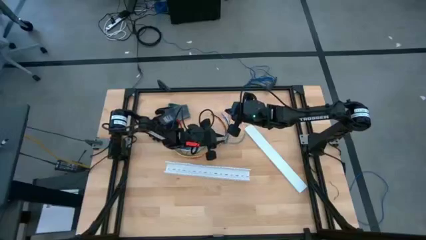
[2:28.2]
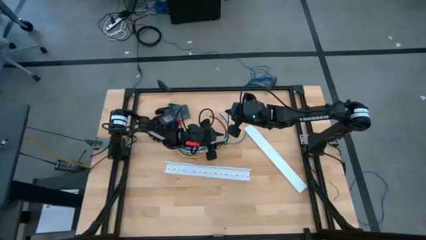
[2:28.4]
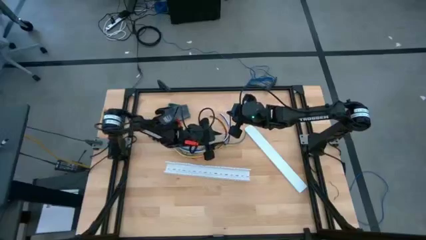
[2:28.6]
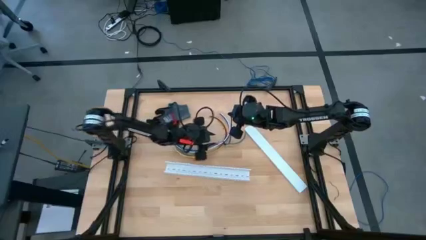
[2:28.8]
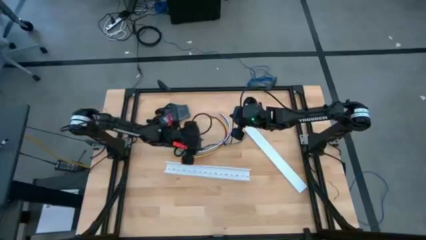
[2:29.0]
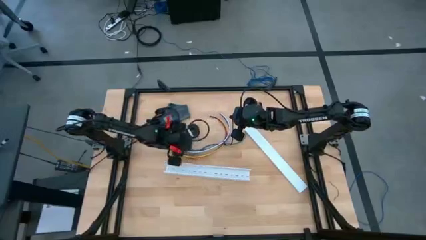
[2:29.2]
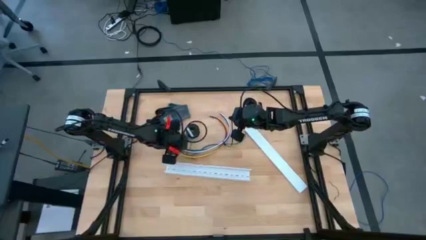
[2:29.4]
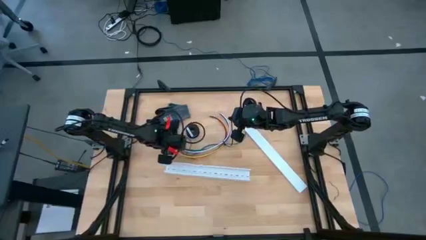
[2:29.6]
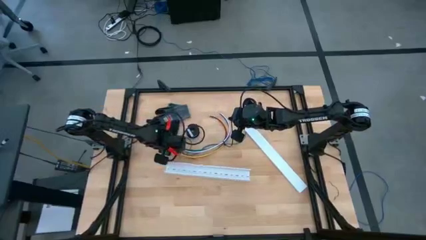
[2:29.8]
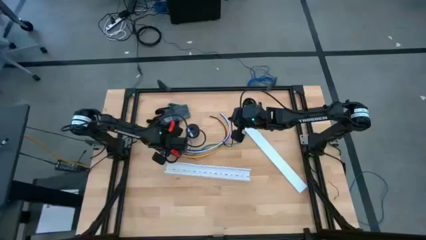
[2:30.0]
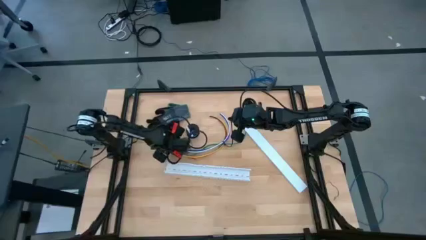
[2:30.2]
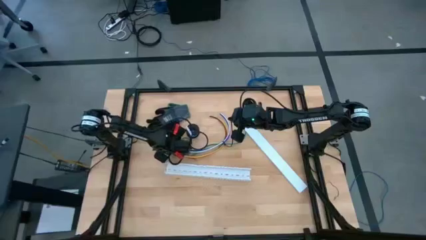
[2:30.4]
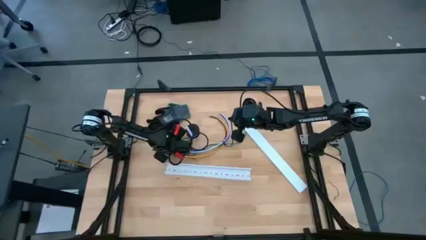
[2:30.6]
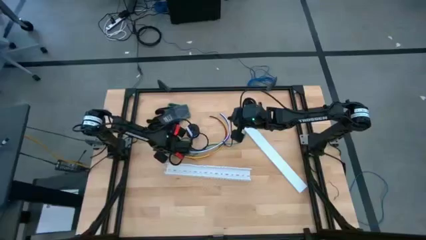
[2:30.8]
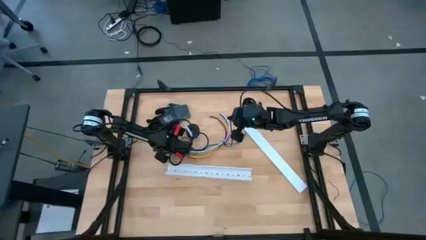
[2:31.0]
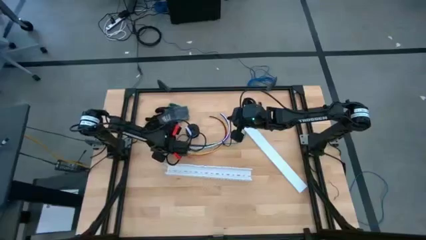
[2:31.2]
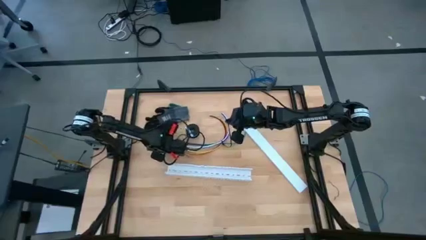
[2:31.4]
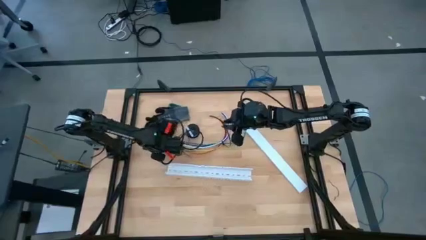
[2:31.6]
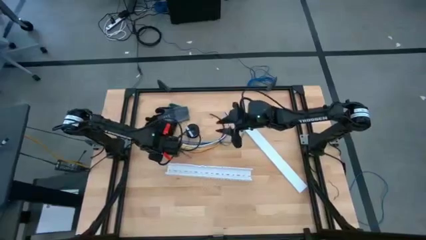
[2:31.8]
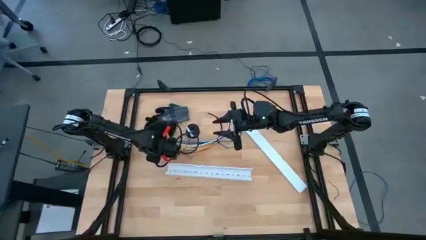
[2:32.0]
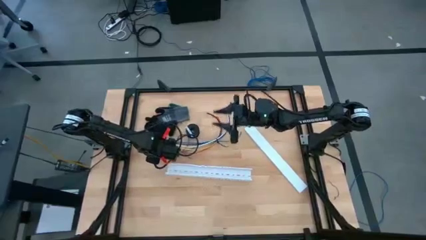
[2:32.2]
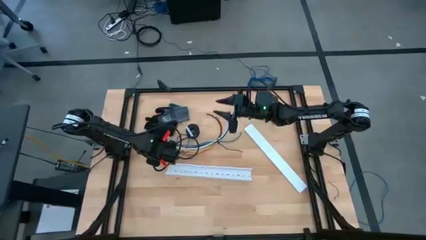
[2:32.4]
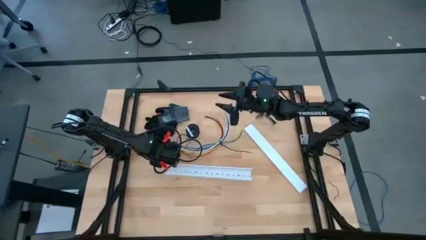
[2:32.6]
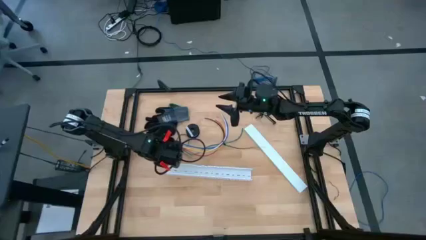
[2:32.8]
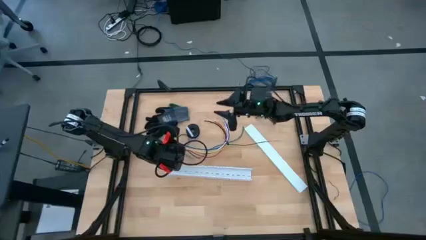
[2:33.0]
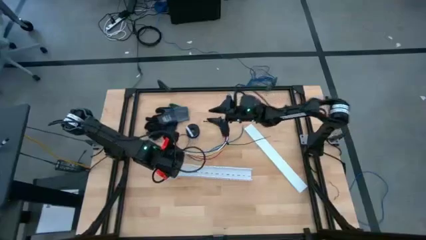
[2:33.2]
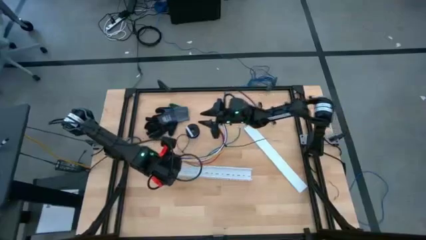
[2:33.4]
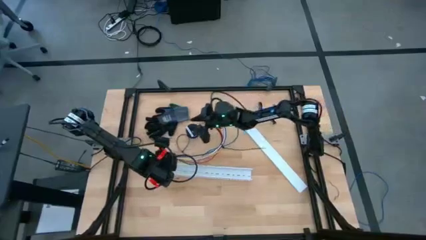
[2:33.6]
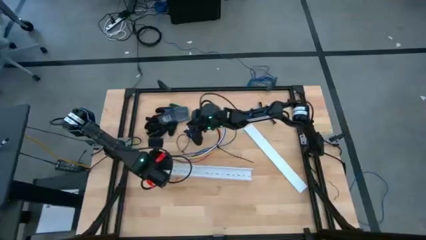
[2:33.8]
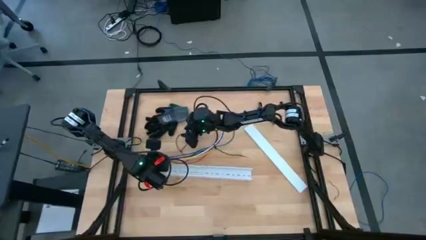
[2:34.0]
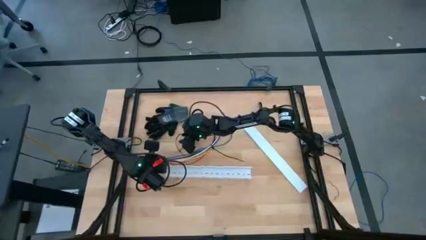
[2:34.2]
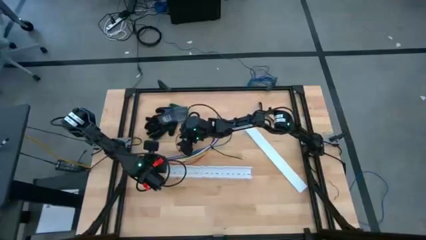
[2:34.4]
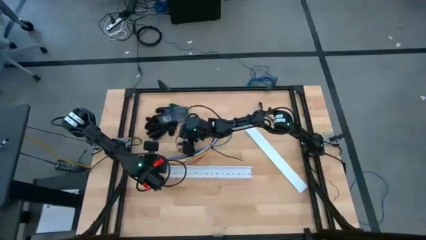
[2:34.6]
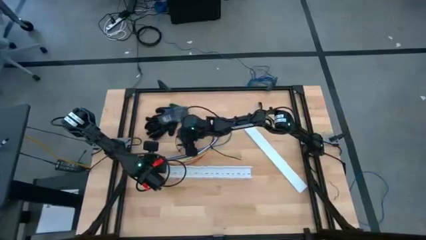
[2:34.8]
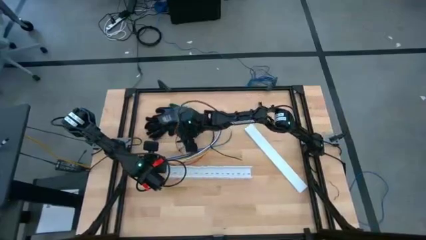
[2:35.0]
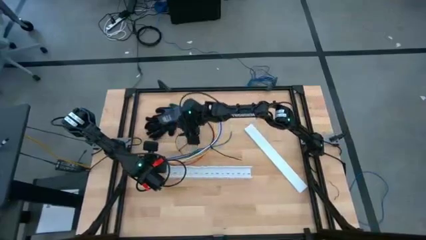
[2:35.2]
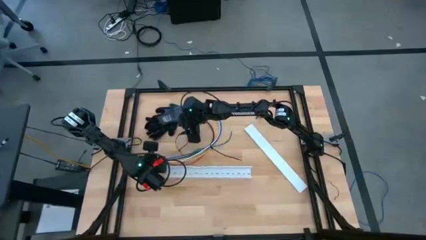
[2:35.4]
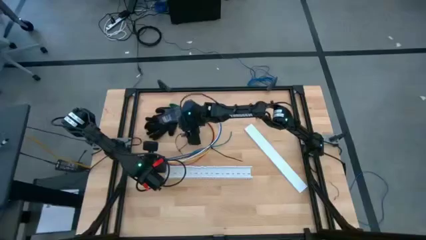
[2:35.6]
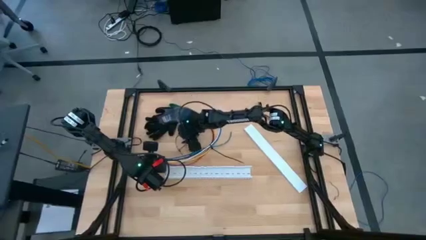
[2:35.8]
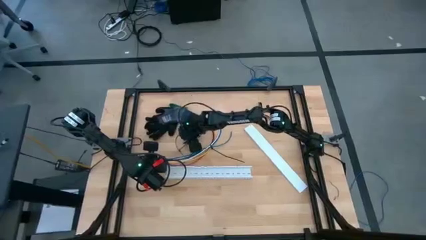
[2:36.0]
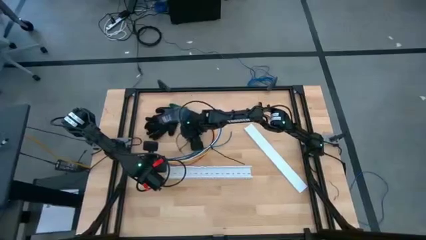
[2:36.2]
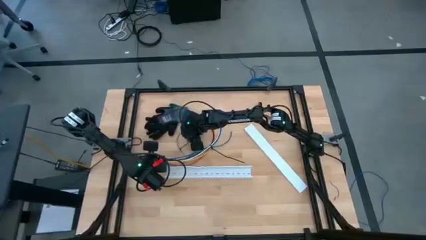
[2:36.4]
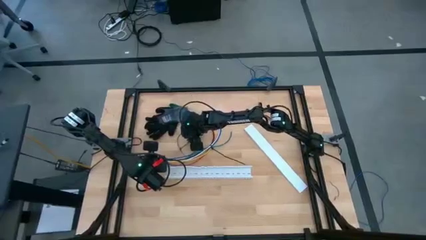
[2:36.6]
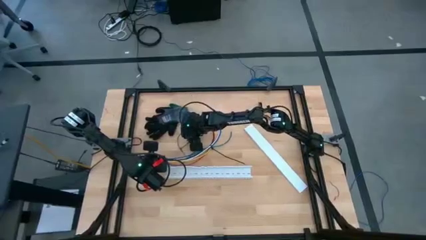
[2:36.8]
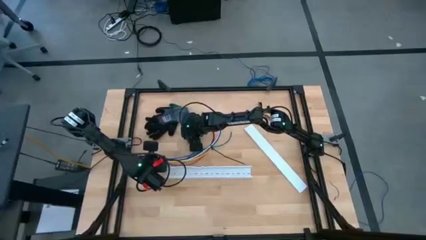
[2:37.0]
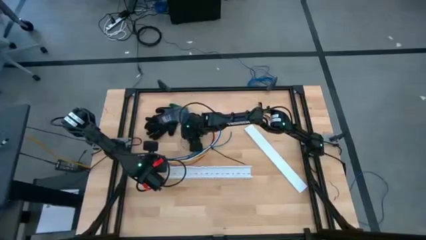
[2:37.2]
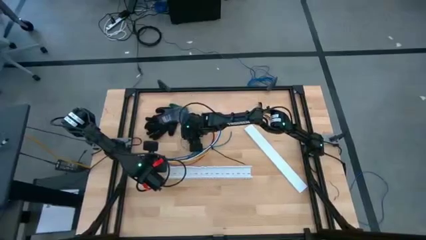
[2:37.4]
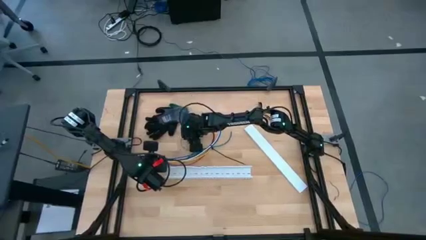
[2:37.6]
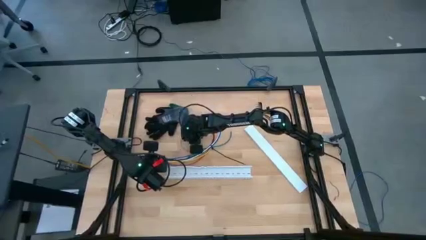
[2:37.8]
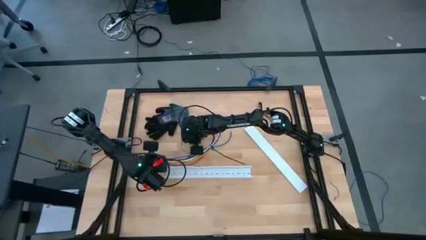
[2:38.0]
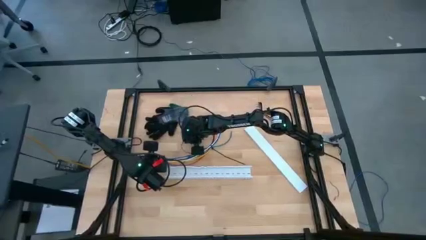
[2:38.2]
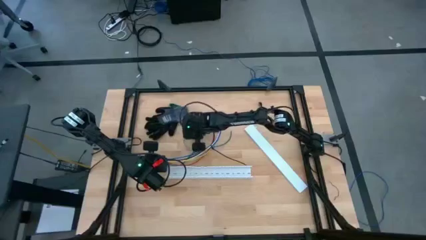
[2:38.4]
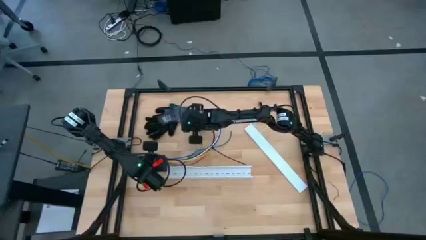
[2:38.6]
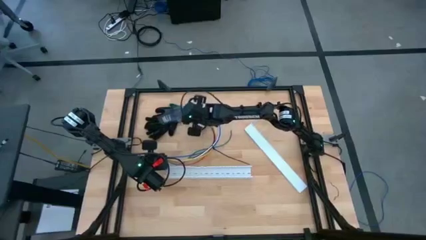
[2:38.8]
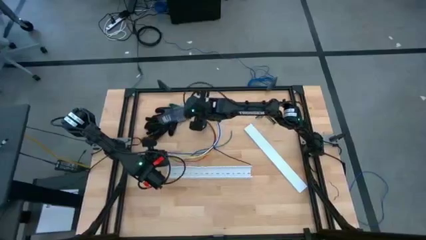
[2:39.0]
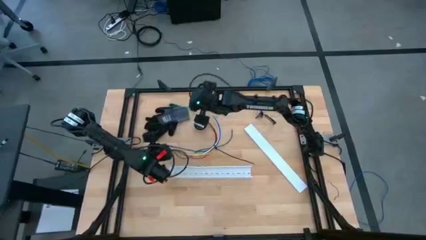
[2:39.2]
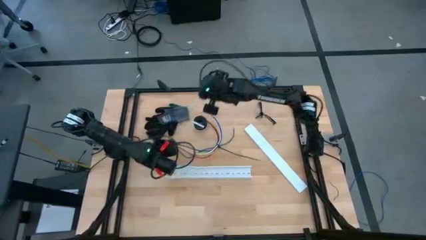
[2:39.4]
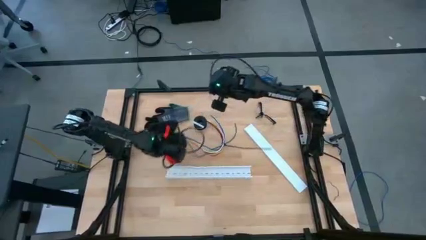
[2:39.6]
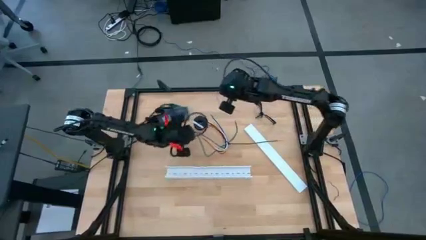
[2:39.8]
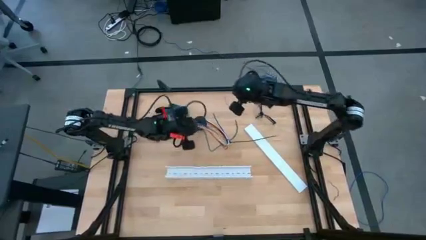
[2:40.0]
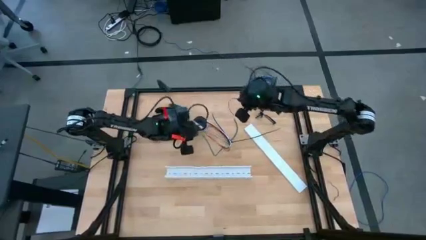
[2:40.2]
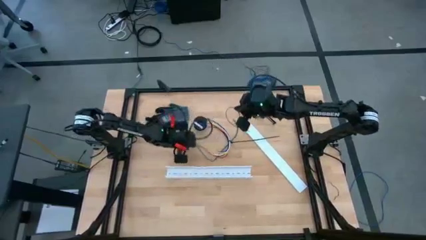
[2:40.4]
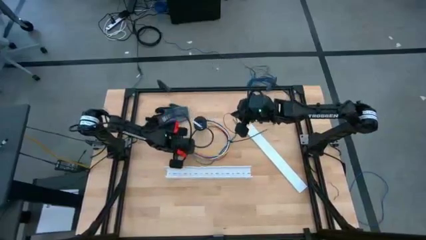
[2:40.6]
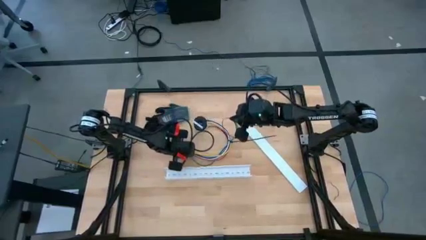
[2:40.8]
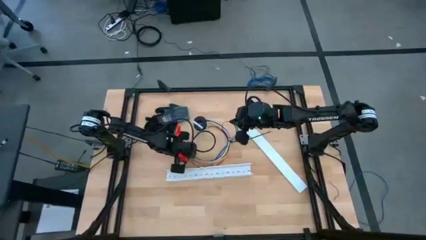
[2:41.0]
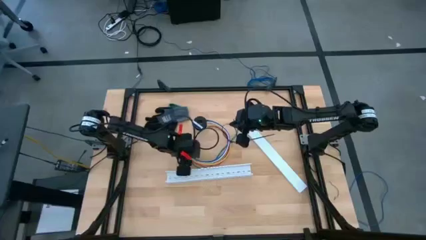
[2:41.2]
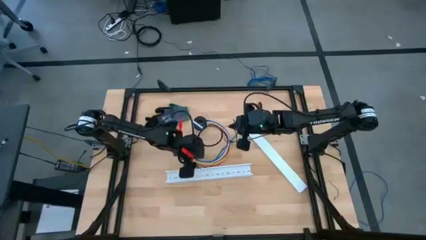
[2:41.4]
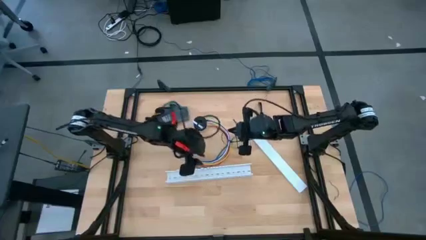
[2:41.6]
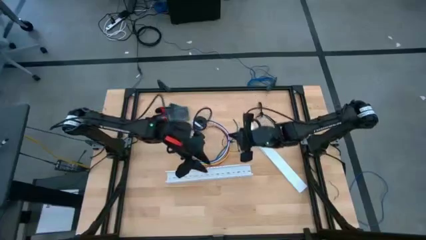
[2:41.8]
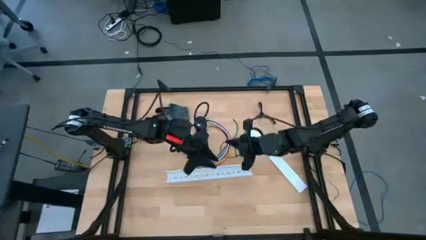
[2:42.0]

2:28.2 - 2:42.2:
Task: Ziptie cables
Wrap the cable wires with the black zip tie
